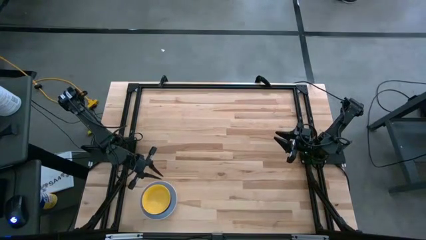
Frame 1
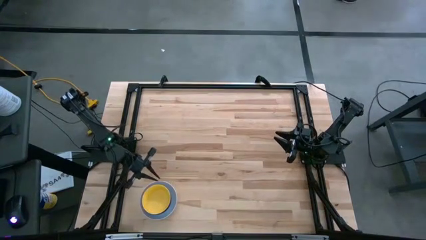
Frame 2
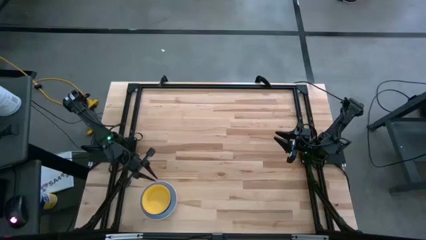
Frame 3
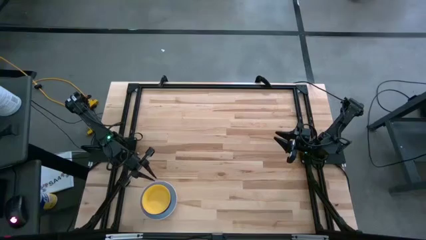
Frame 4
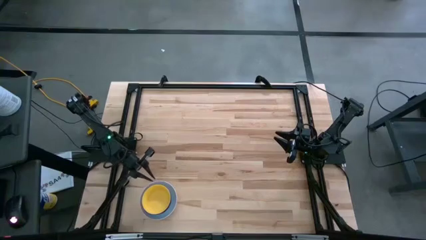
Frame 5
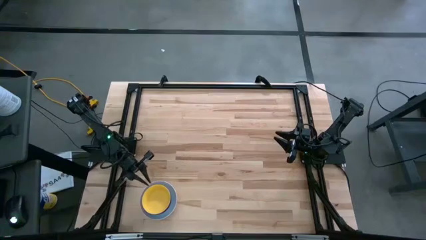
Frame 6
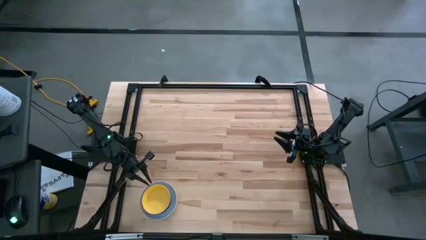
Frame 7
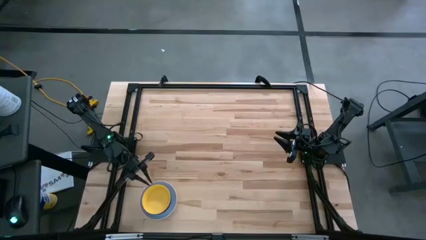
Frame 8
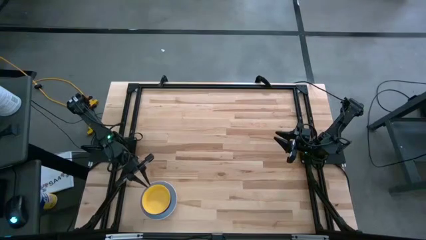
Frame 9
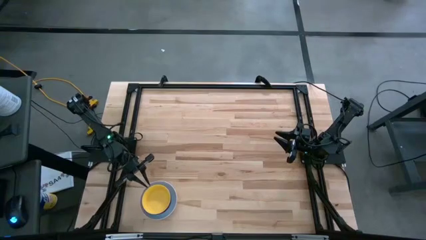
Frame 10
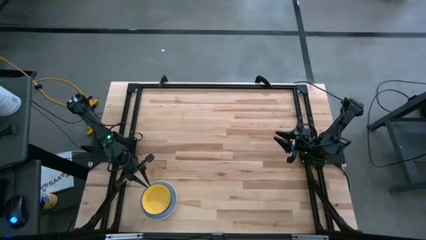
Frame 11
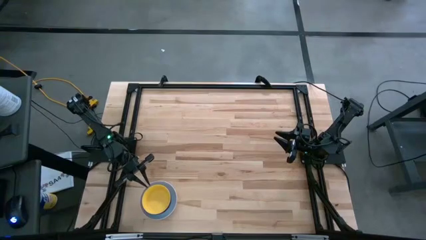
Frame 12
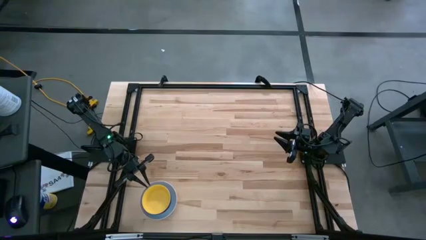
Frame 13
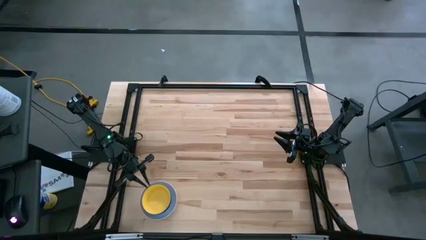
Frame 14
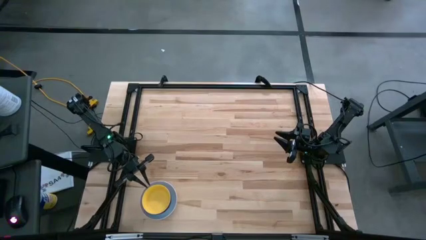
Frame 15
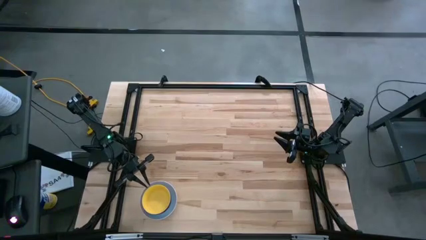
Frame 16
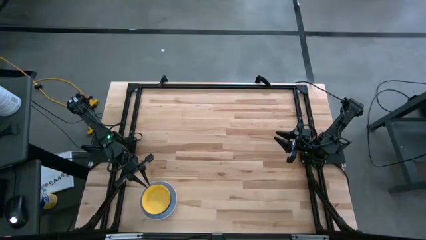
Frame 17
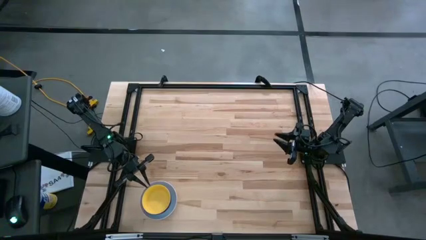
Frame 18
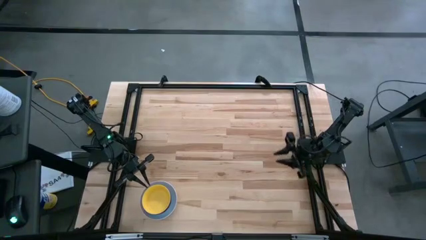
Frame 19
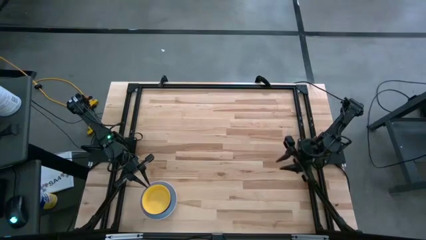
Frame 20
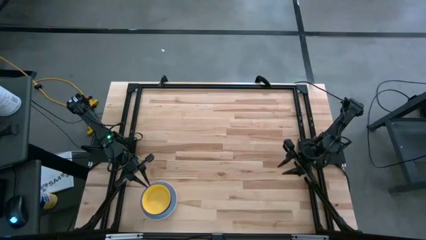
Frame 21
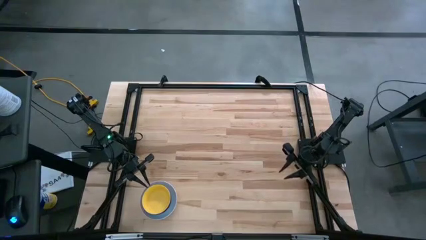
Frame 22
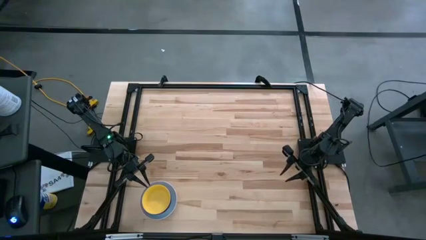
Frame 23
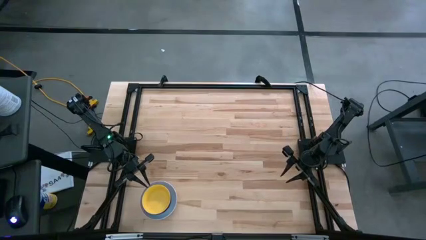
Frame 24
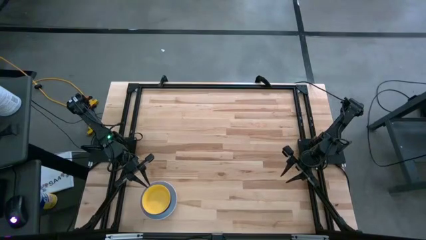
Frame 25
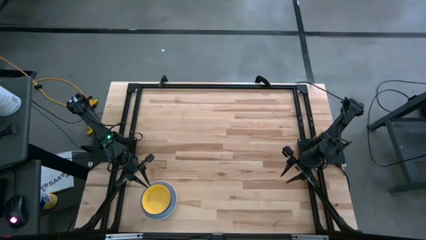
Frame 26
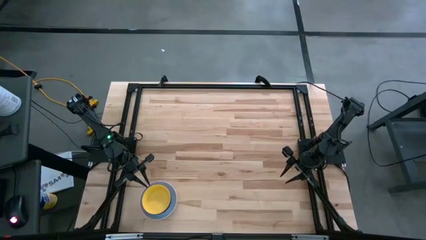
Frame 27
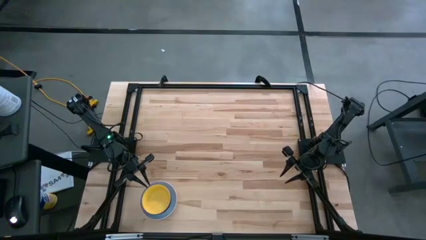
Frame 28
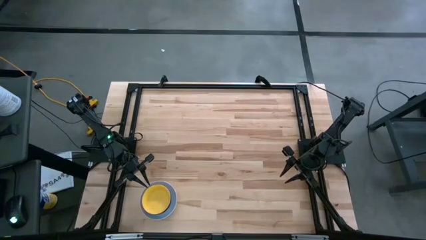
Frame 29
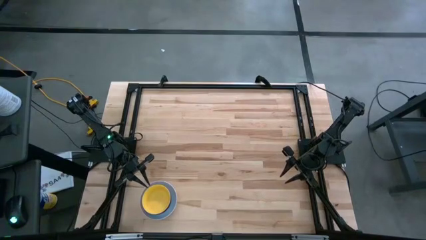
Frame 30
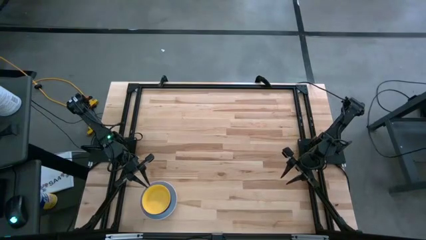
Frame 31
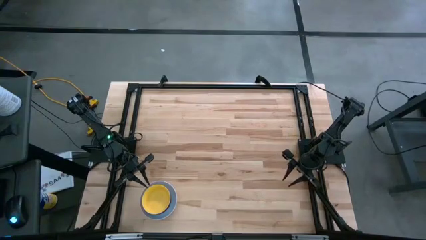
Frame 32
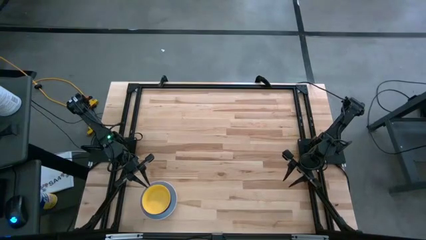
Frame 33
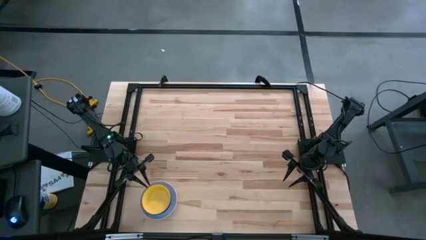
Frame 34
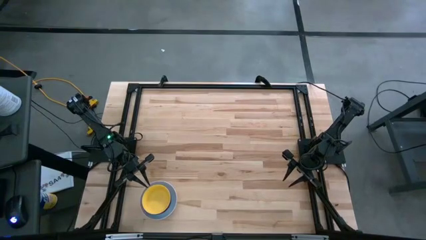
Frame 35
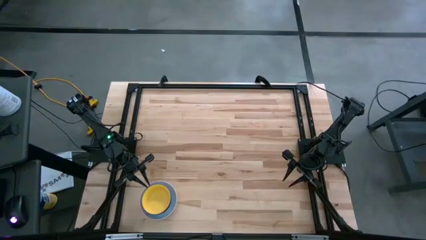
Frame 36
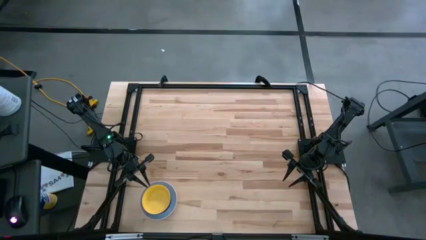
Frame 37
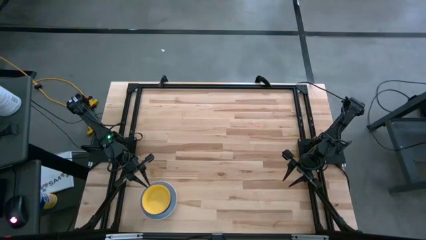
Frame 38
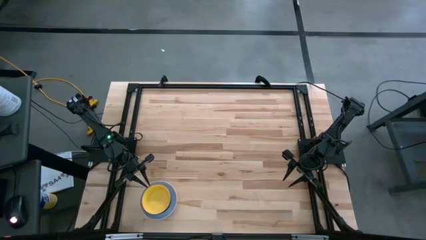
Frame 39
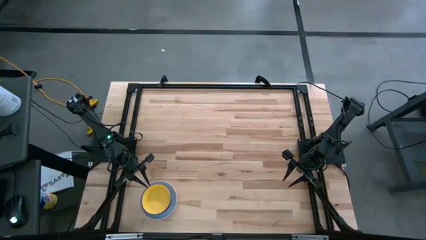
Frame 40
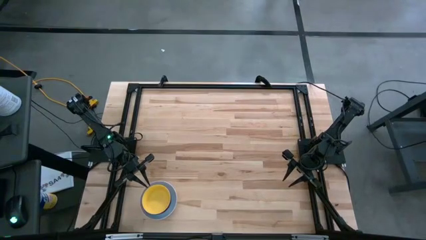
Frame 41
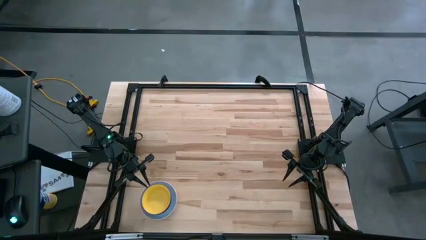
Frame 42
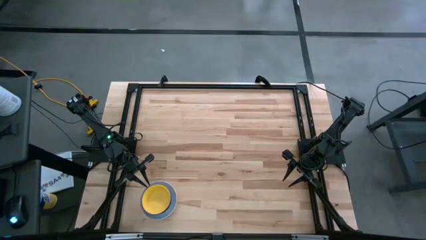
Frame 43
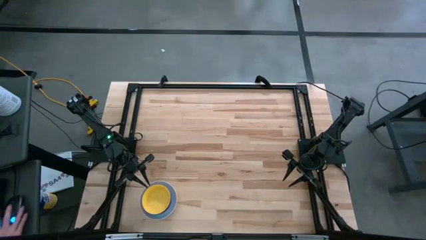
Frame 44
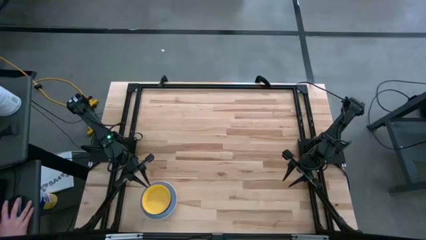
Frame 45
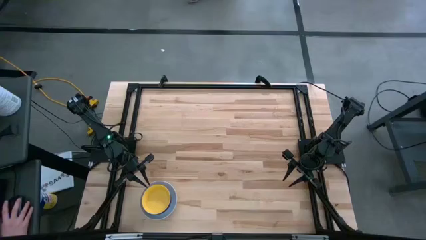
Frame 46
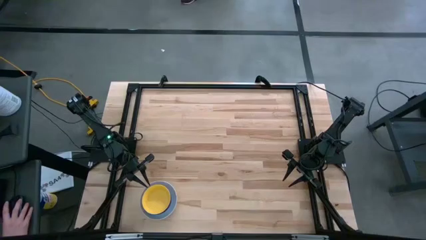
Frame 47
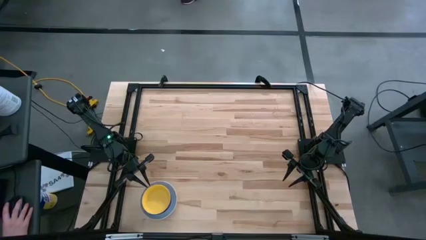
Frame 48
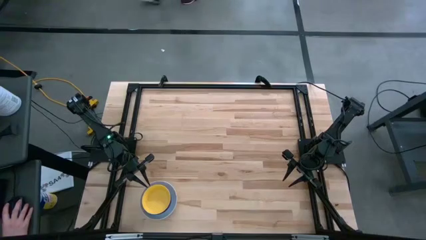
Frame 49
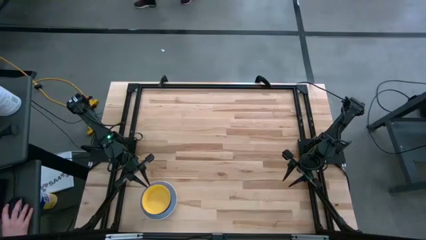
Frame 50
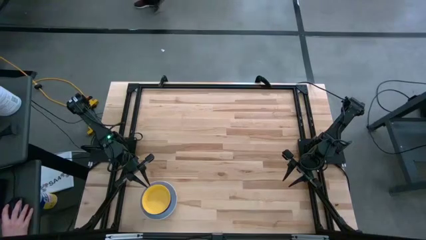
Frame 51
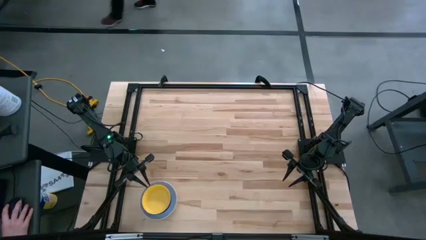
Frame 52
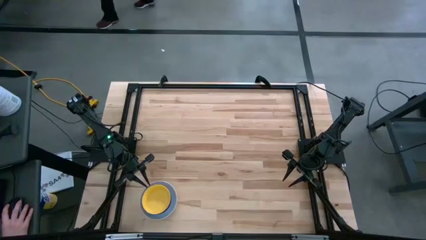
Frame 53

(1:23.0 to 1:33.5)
Return to Home Position
